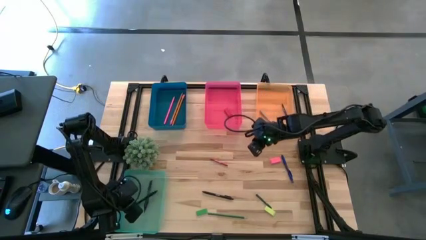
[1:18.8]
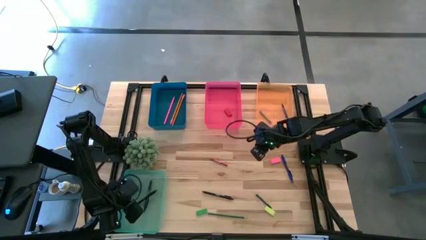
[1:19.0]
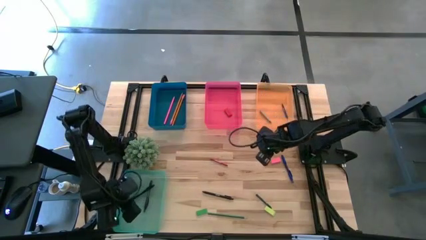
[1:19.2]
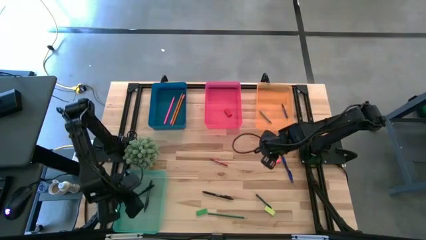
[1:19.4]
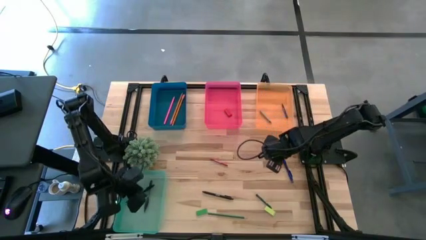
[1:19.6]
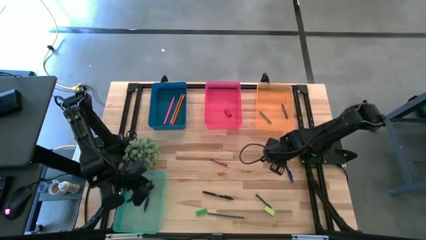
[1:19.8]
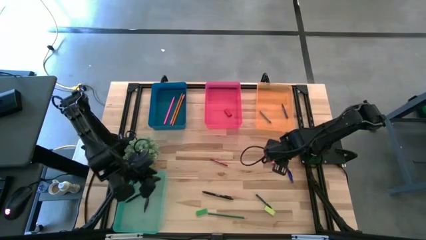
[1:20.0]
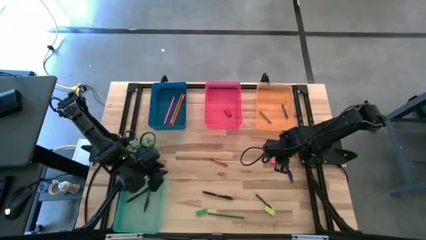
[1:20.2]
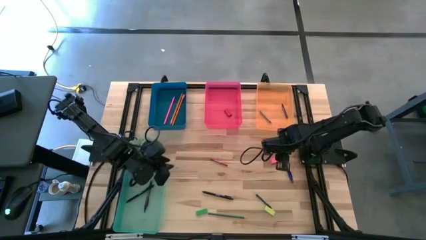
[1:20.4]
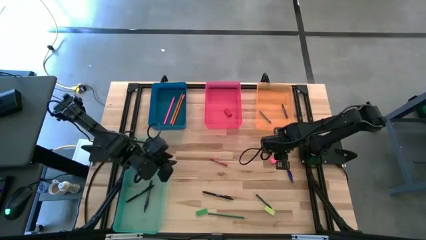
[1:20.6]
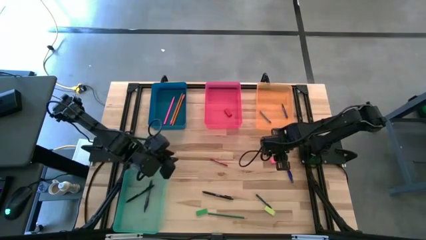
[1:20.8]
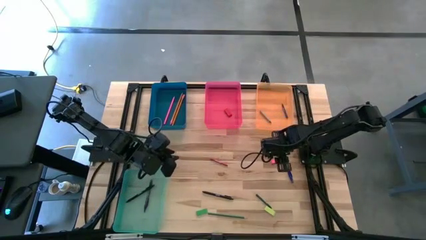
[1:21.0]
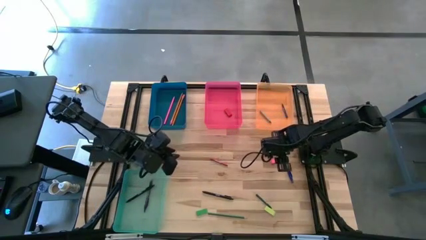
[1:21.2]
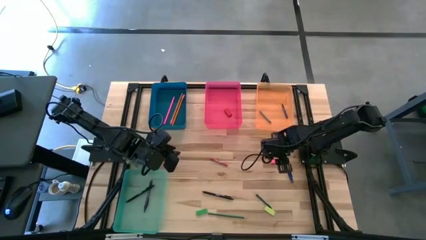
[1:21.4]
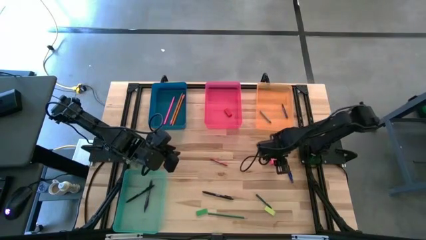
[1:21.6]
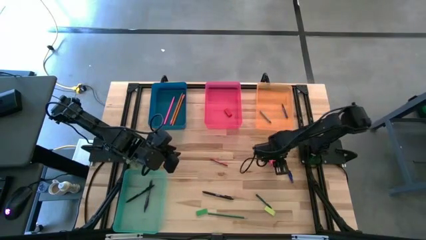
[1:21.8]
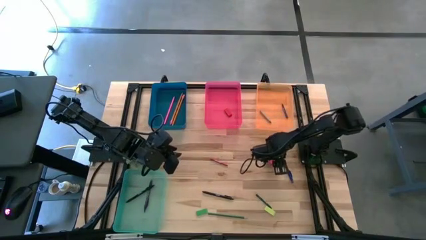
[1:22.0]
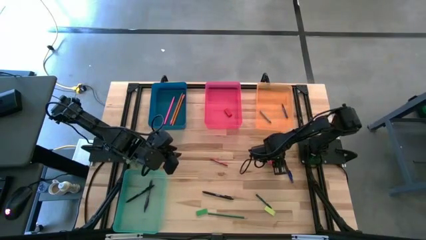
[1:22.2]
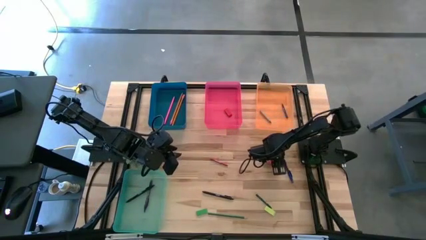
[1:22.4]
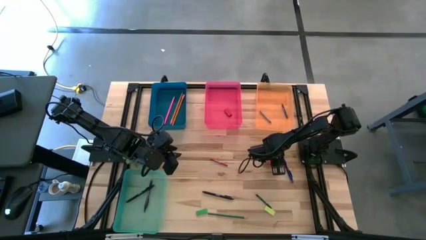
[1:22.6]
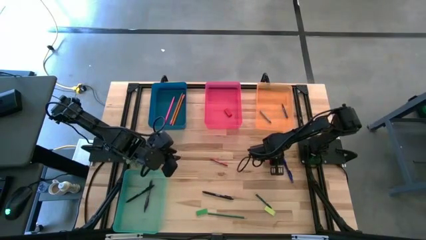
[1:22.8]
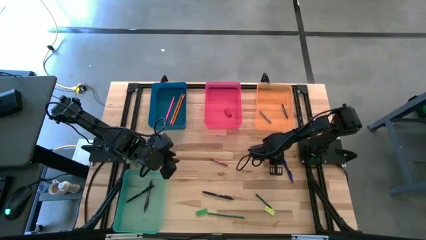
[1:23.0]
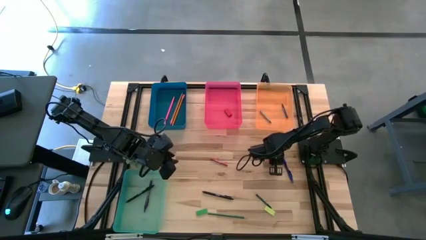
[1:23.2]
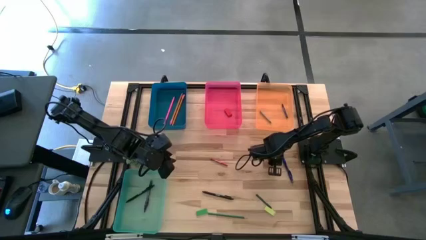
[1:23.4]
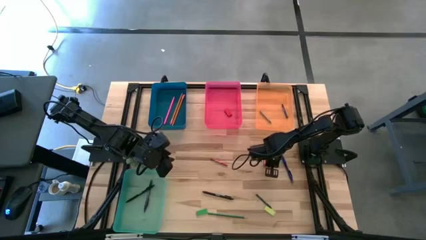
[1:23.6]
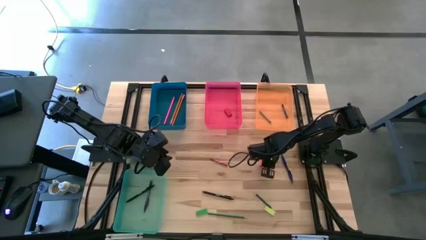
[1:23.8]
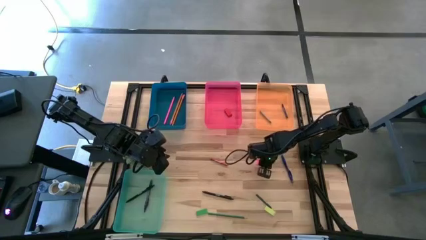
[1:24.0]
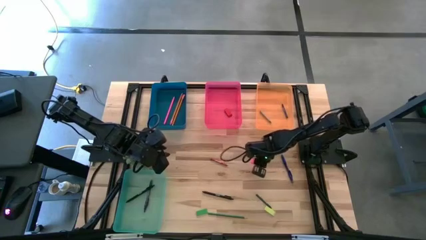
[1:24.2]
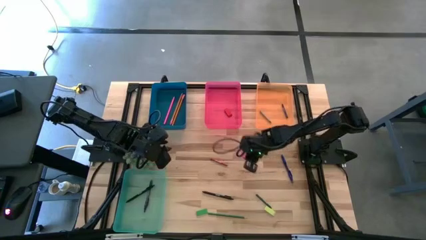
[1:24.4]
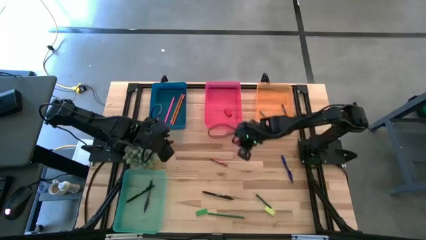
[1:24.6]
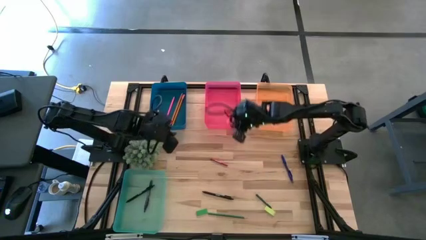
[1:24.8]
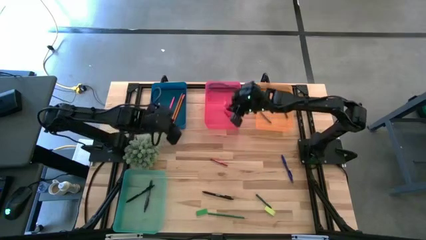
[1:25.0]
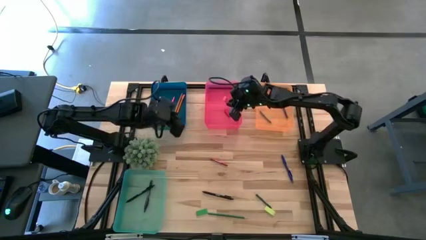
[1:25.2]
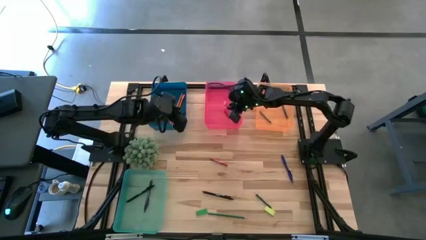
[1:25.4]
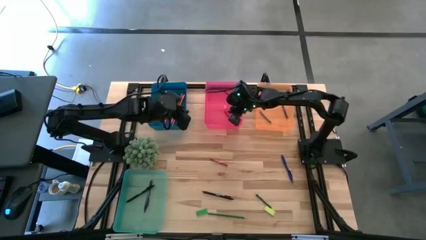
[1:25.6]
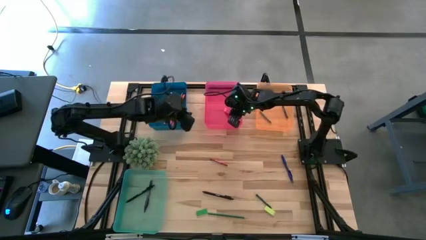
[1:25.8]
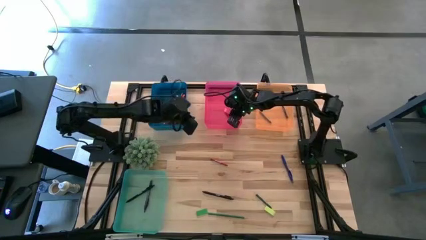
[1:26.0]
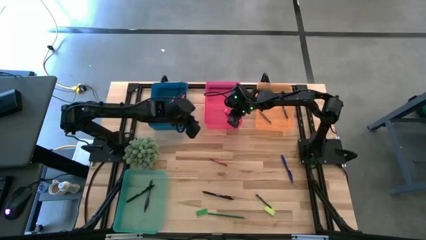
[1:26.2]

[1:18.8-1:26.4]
Task: Sort crayons/erasers/pens/pencils in bins
Put the pink eraser into the pink bin

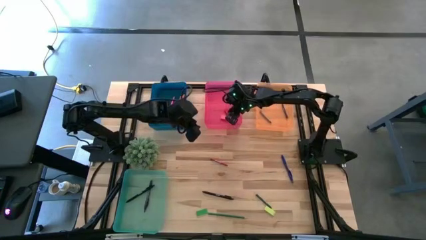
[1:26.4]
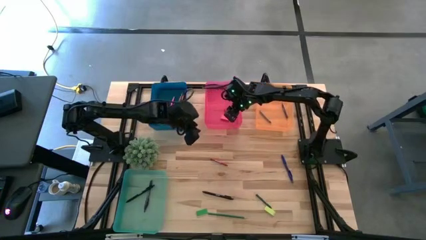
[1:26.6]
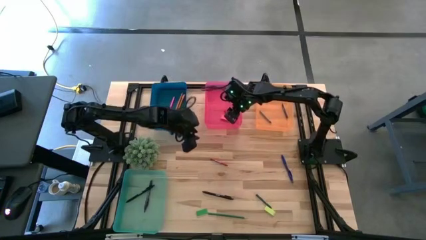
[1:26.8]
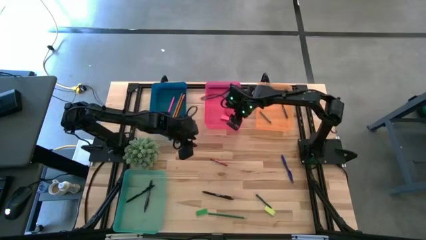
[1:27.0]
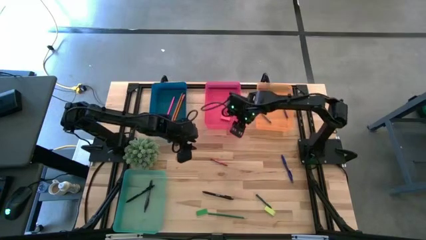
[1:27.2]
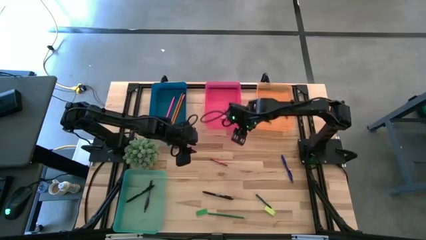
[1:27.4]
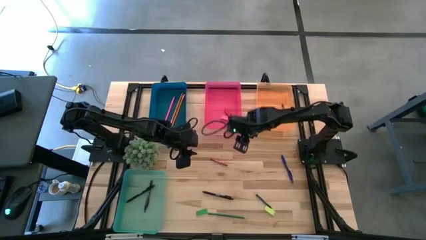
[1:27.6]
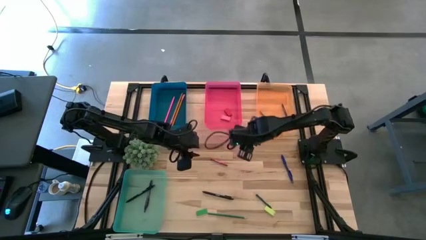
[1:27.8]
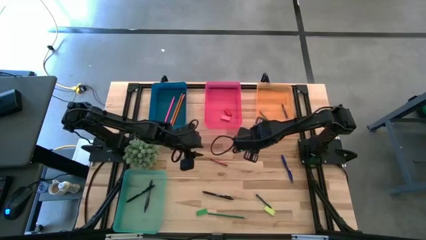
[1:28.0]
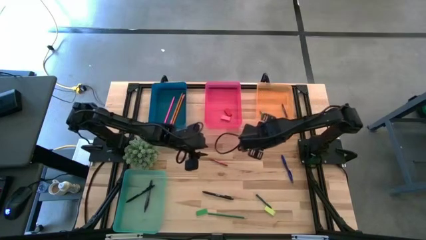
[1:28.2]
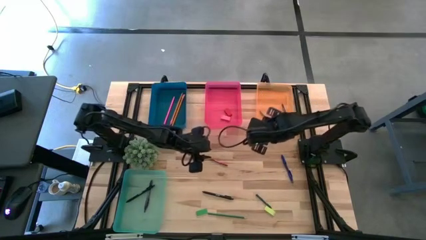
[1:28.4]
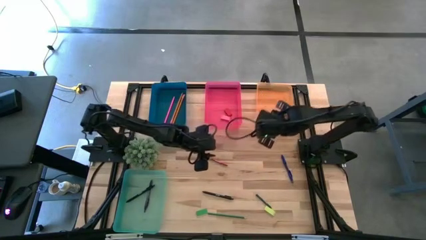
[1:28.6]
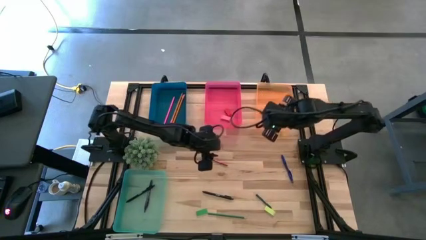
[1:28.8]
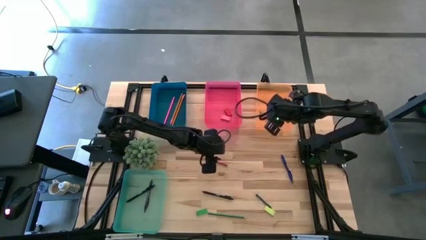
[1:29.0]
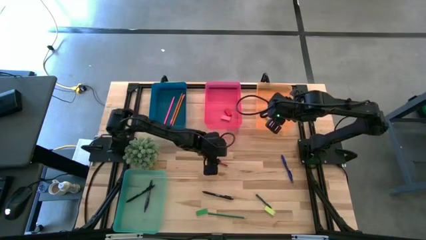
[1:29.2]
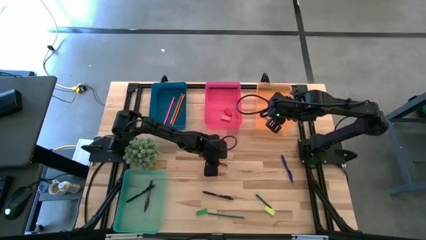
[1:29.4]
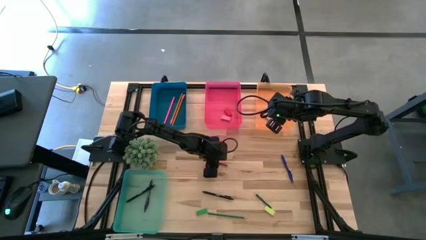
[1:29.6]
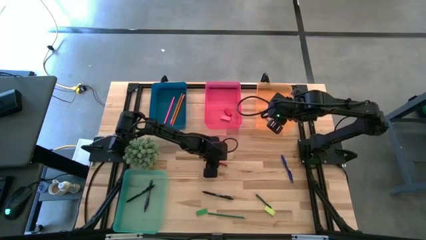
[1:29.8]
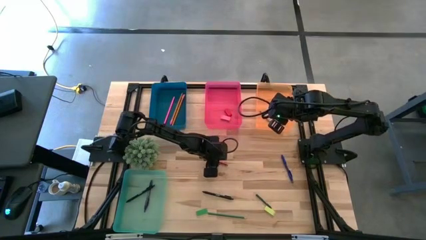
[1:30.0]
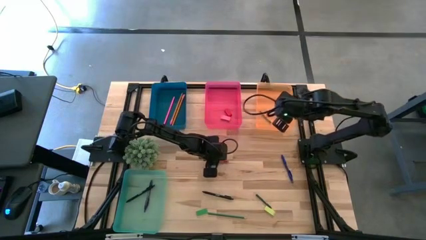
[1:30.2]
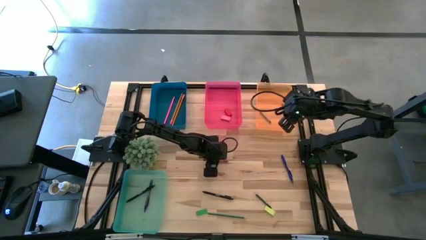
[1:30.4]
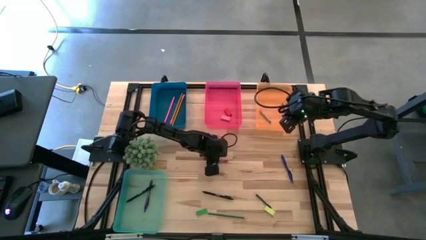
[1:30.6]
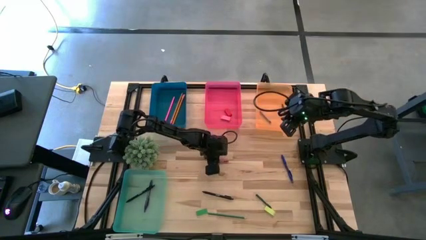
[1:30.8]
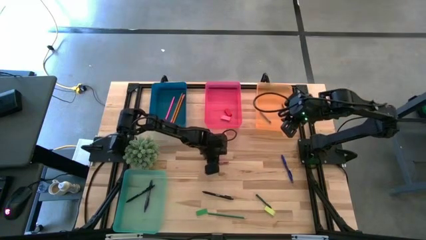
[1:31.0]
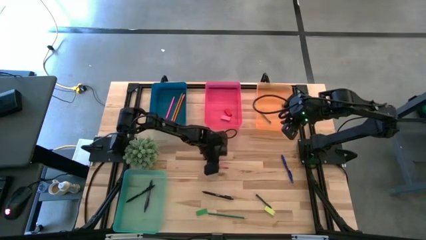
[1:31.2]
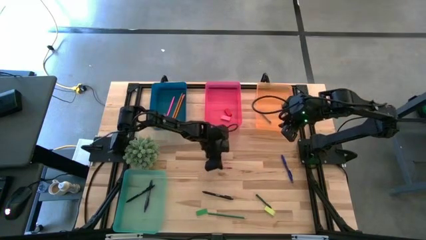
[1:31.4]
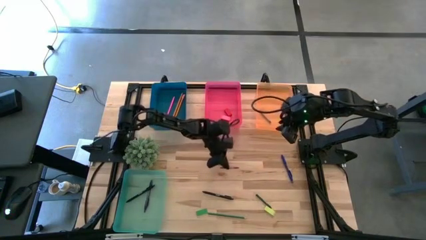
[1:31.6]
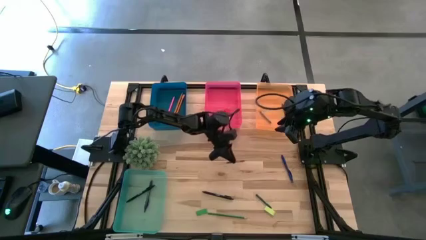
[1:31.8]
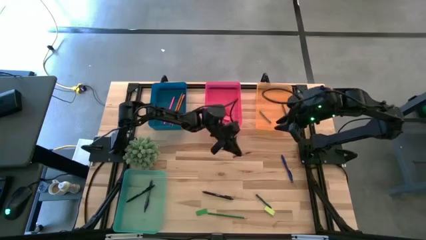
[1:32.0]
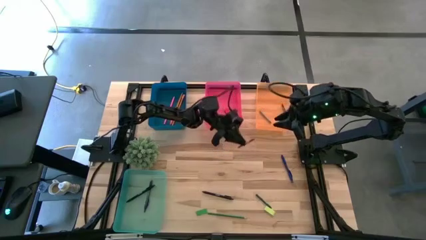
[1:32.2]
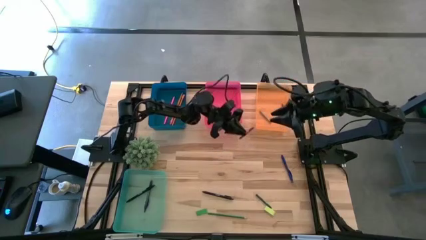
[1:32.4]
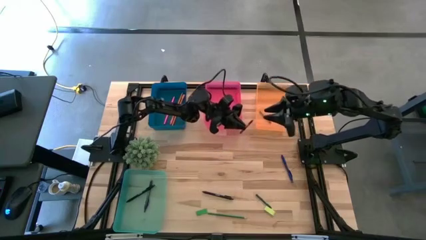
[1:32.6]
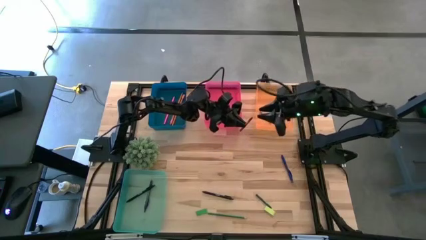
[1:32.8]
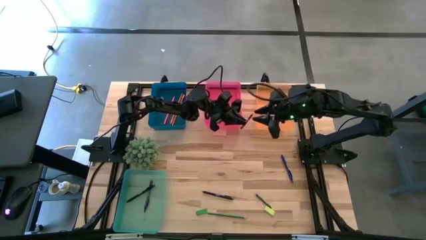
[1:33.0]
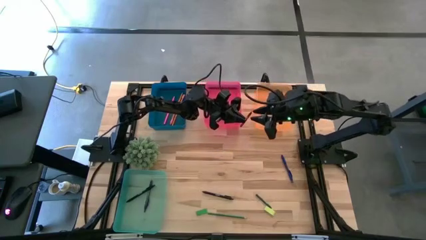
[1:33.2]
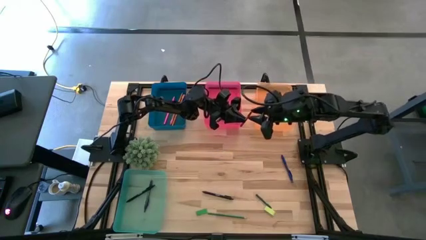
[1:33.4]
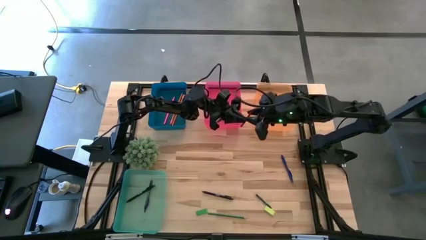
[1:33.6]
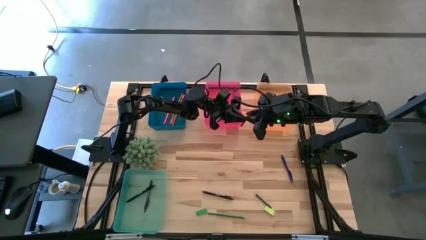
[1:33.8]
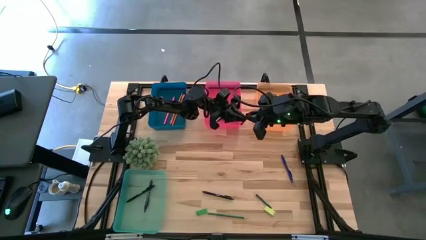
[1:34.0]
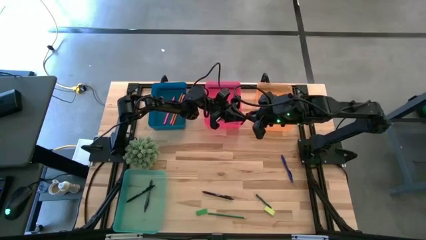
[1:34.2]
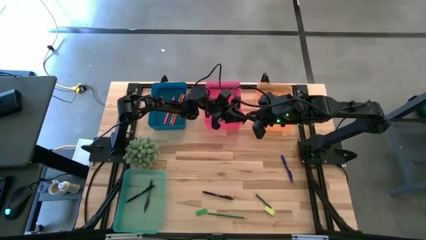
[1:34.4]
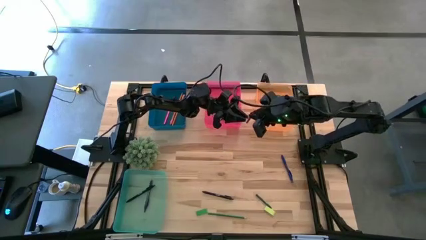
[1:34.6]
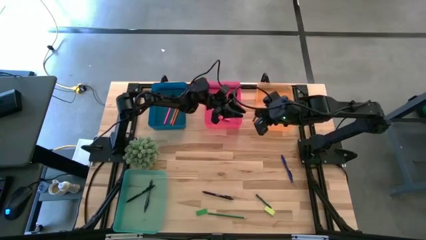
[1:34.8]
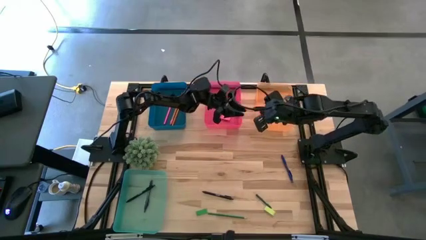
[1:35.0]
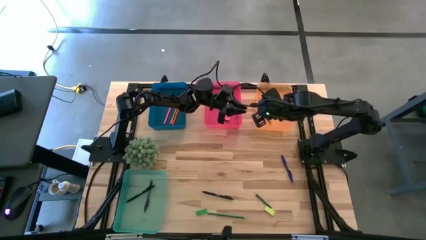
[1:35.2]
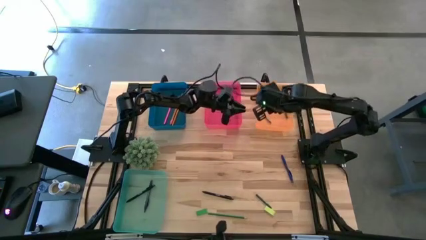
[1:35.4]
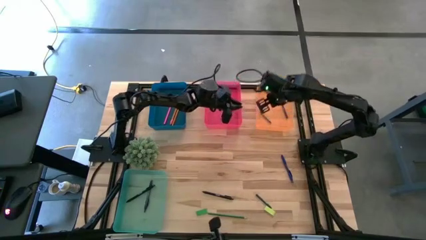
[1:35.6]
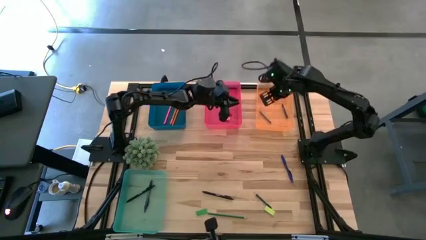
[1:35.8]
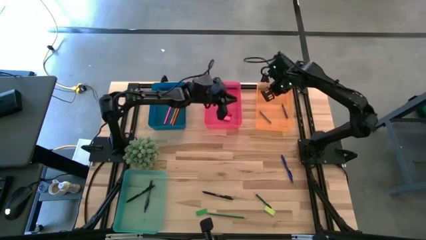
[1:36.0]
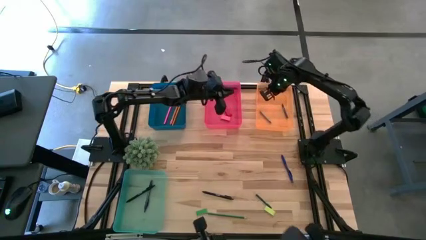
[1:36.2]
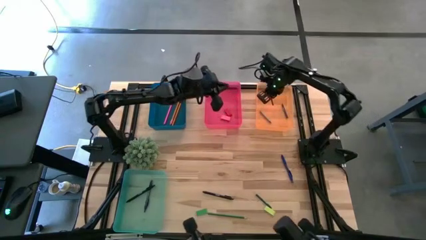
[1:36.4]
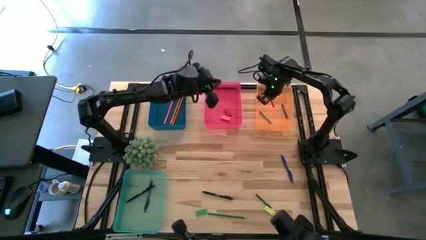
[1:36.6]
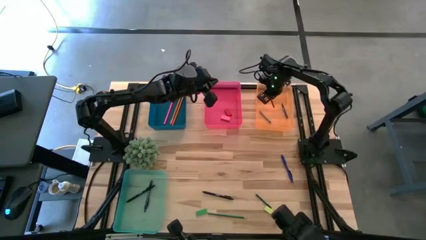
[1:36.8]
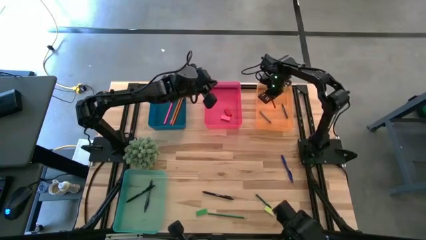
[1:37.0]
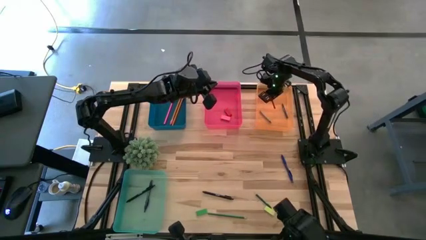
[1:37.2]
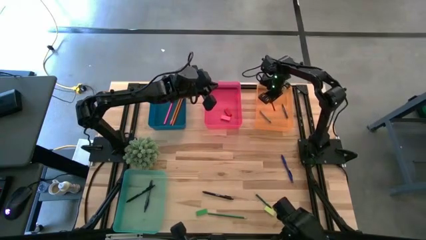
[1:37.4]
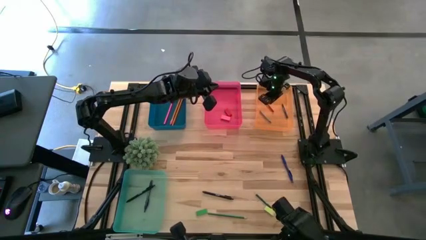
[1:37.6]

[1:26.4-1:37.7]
Put the red crayon into the orange bin
